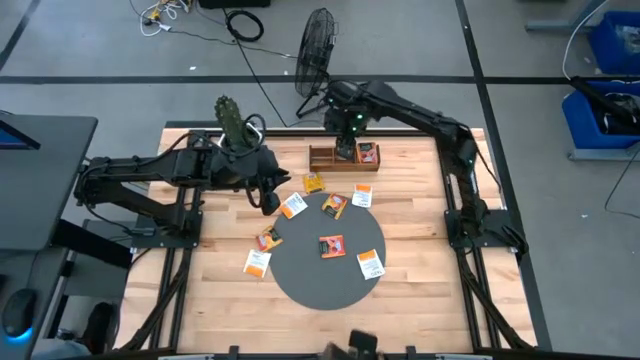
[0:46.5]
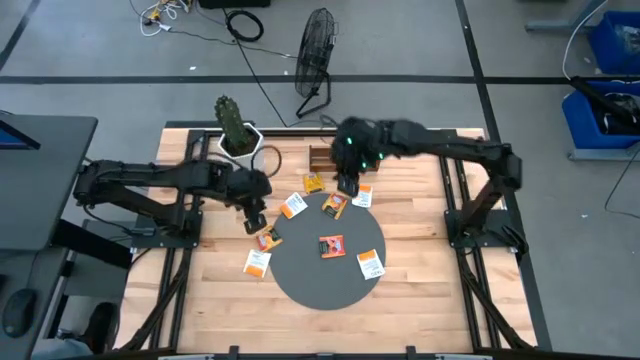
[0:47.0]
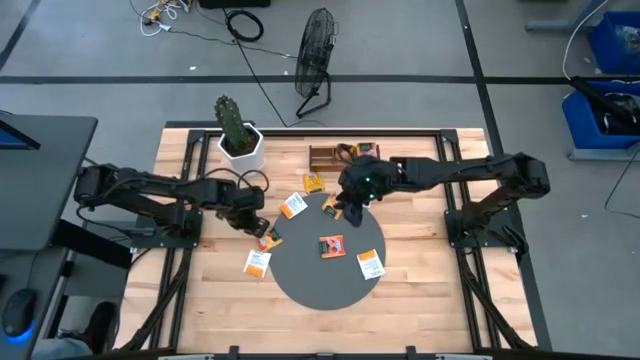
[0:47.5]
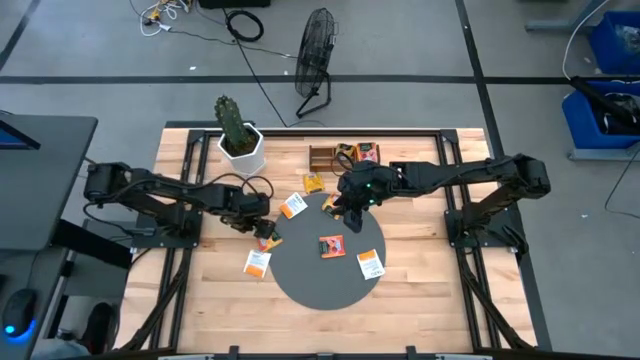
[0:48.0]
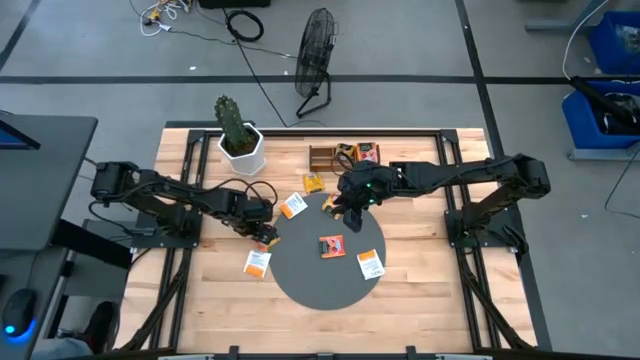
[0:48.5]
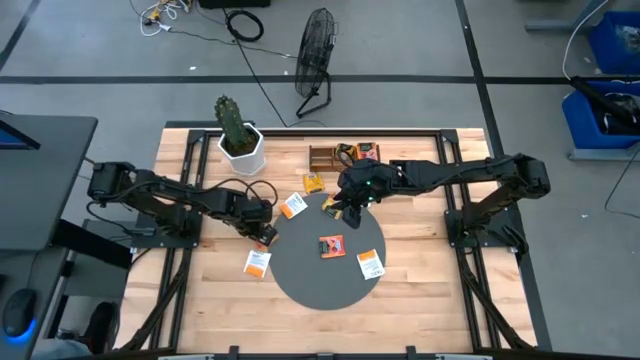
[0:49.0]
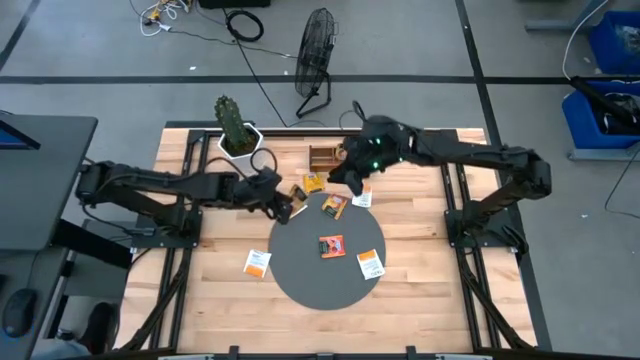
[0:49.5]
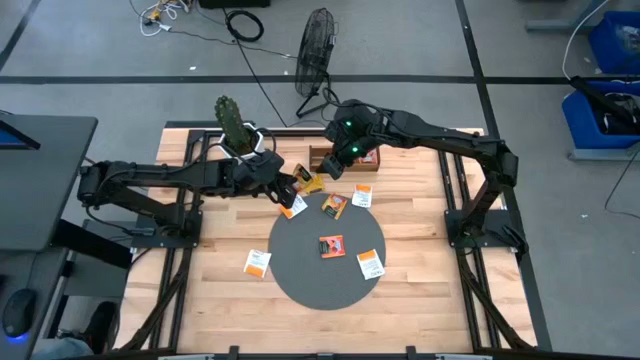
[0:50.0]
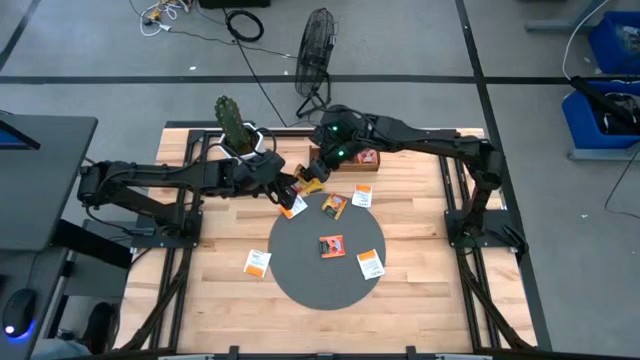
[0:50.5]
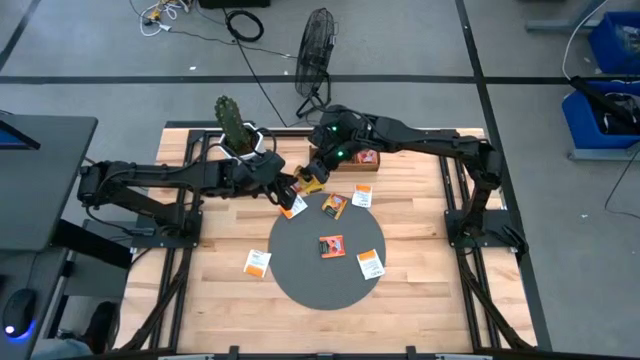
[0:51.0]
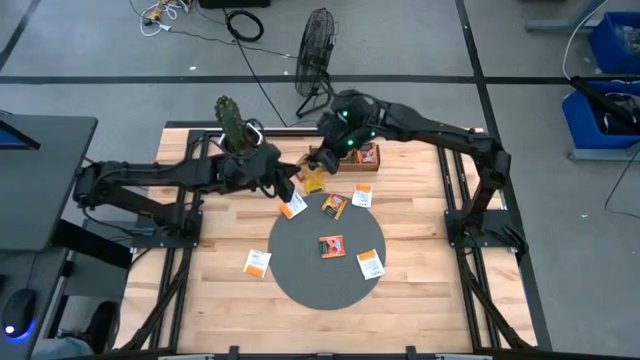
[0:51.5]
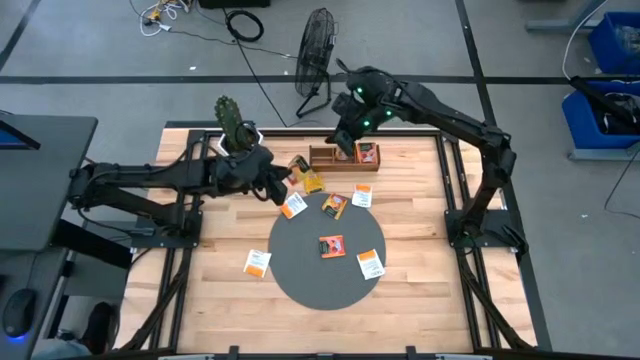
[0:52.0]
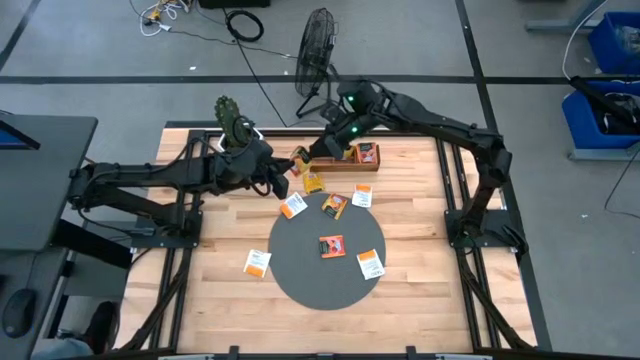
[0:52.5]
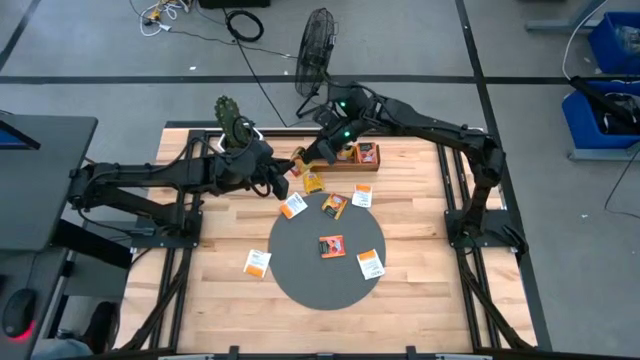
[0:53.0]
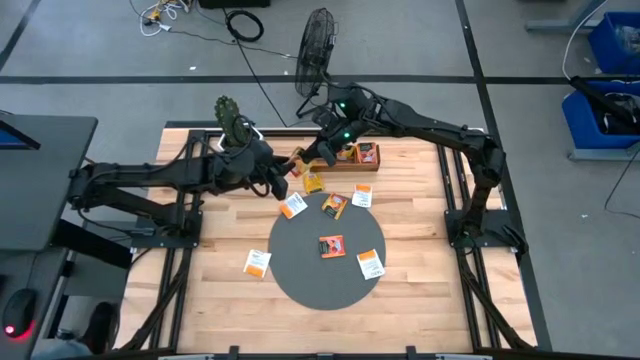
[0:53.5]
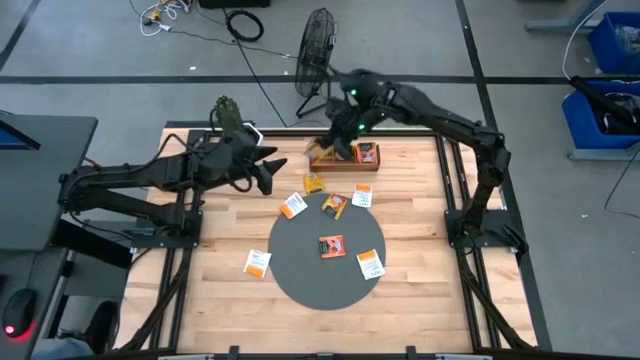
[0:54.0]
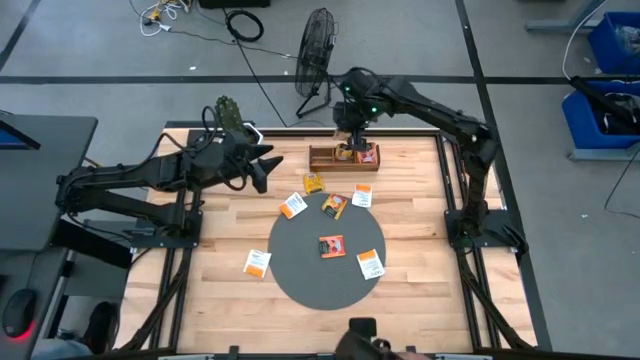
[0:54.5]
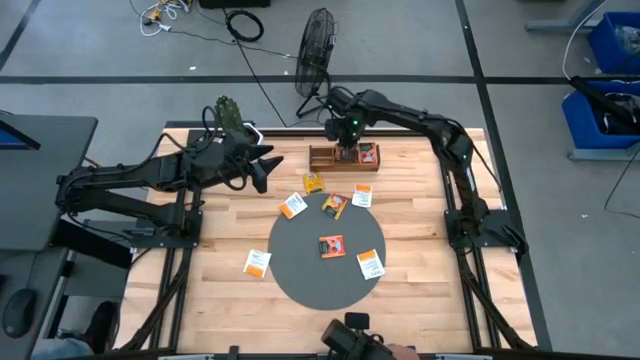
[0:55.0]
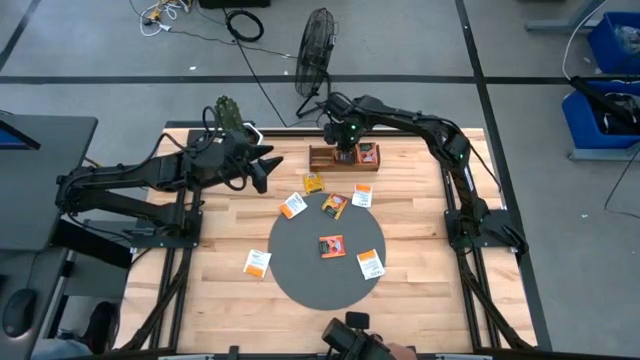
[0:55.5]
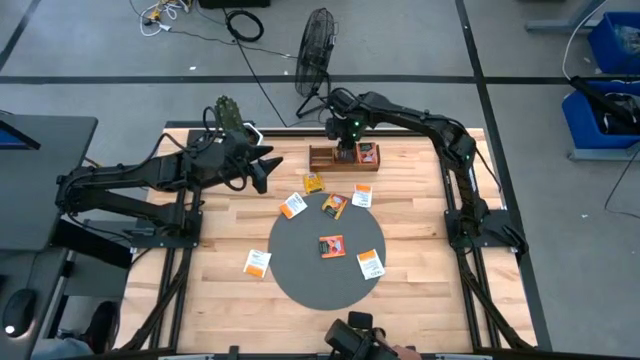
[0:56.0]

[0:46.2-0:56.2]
Task: Pick & Place Tea
Put the orange tea bag into the middle section of the wooden organizer

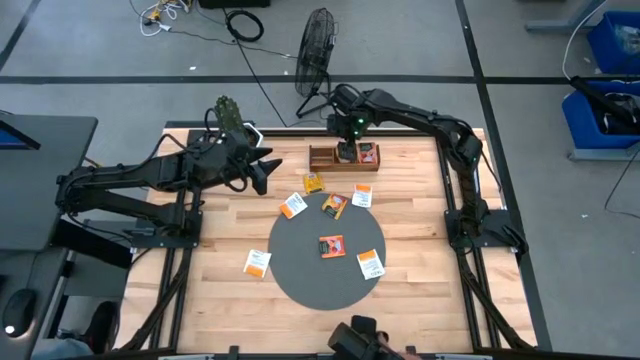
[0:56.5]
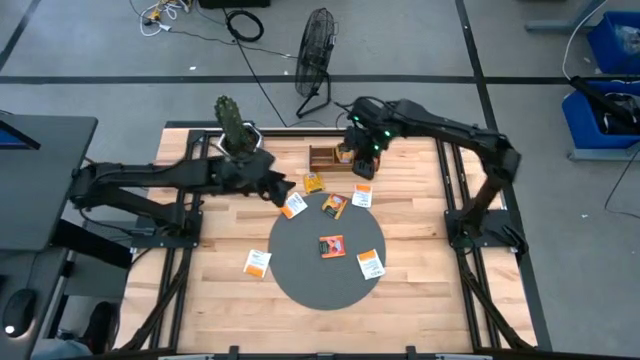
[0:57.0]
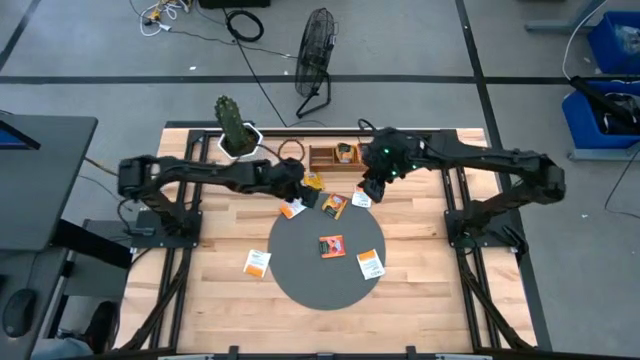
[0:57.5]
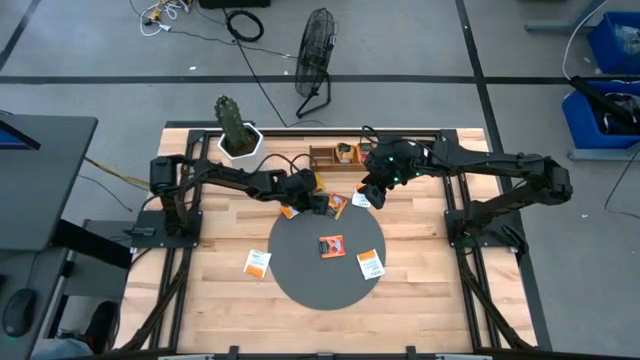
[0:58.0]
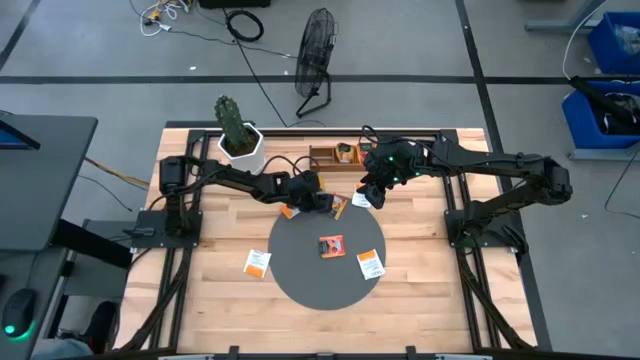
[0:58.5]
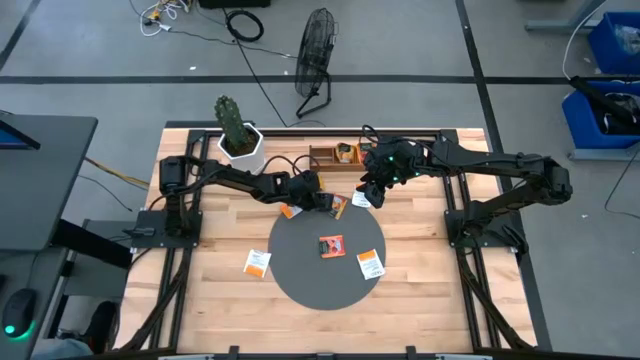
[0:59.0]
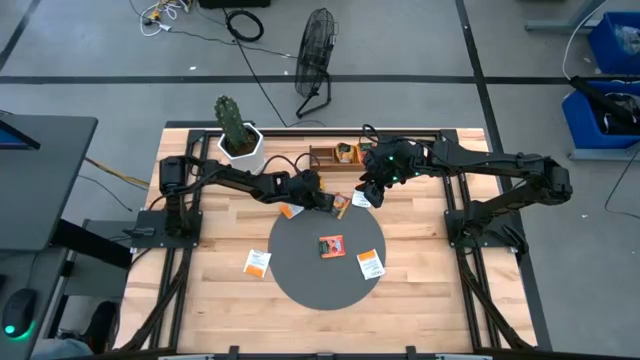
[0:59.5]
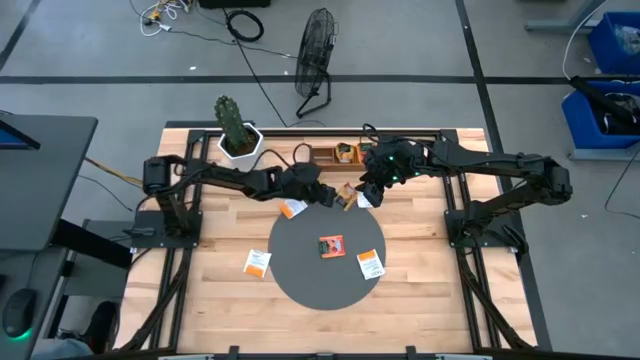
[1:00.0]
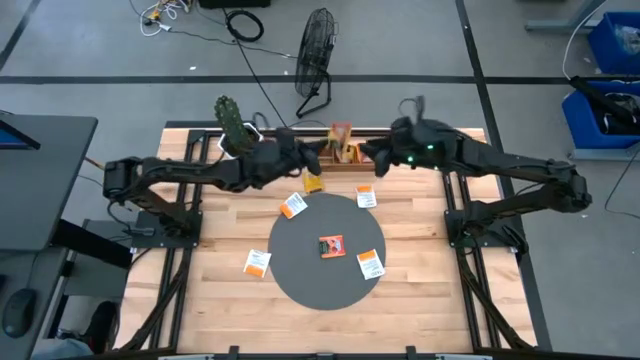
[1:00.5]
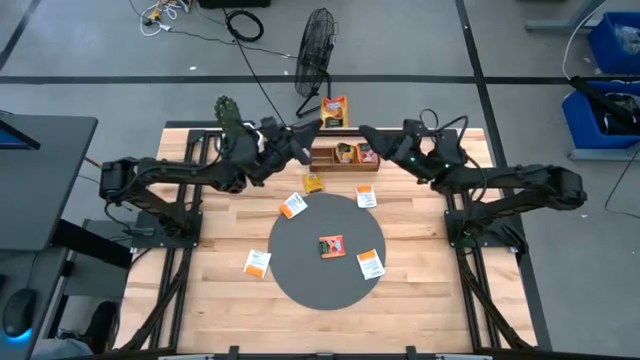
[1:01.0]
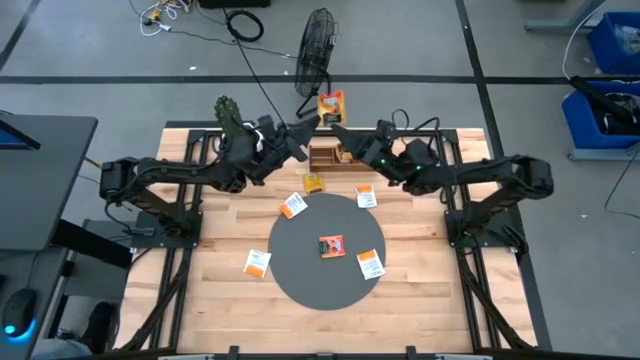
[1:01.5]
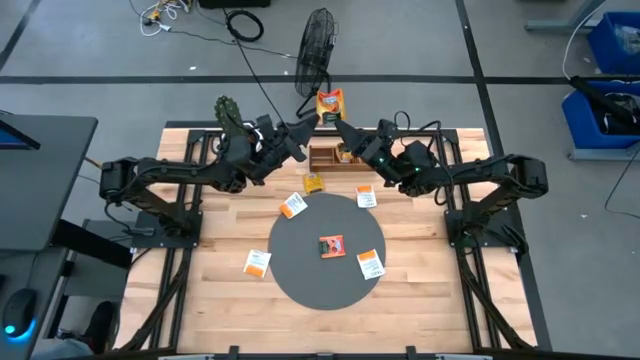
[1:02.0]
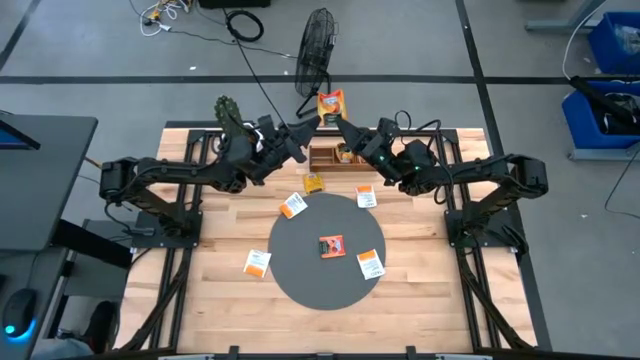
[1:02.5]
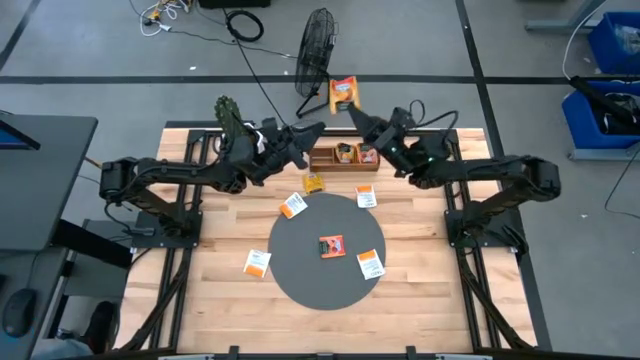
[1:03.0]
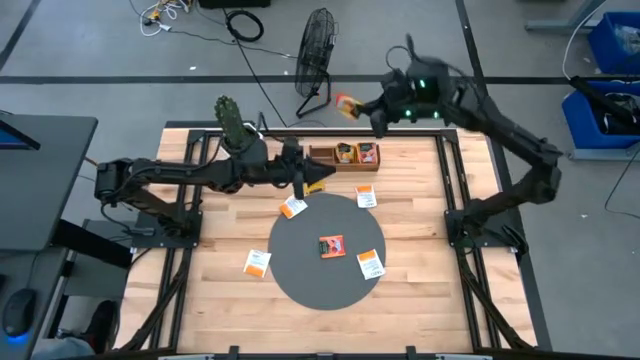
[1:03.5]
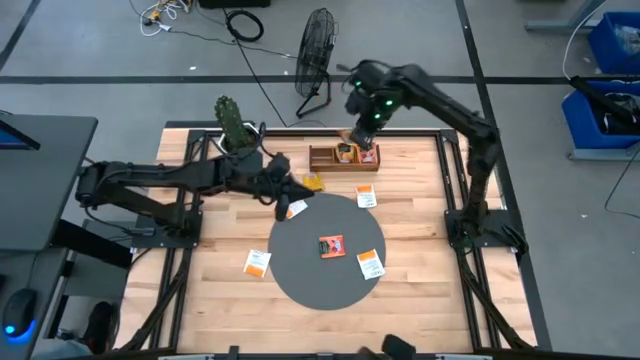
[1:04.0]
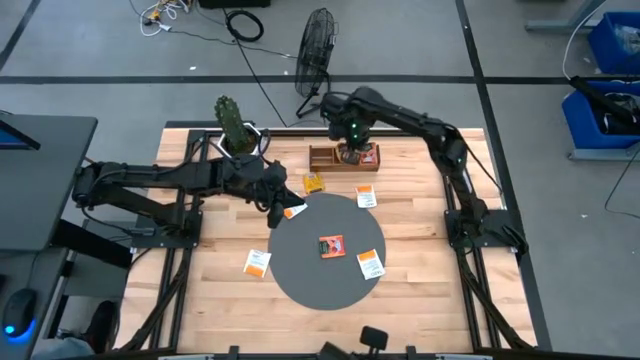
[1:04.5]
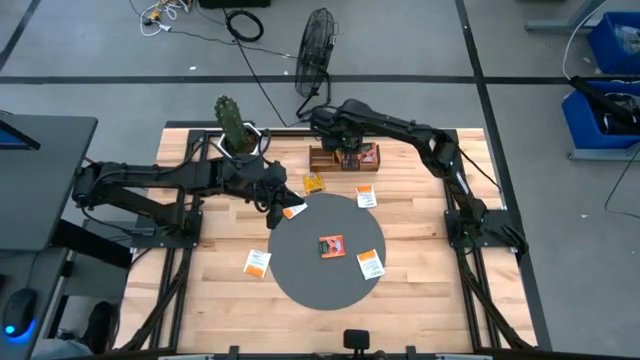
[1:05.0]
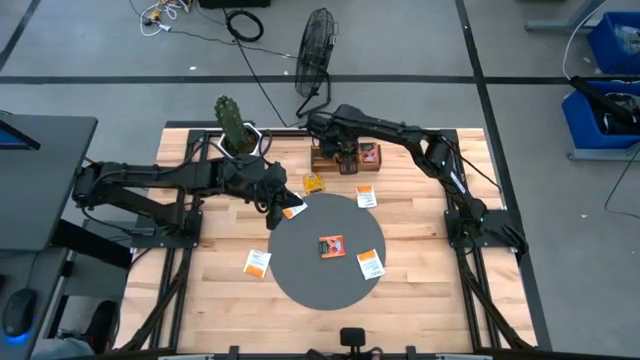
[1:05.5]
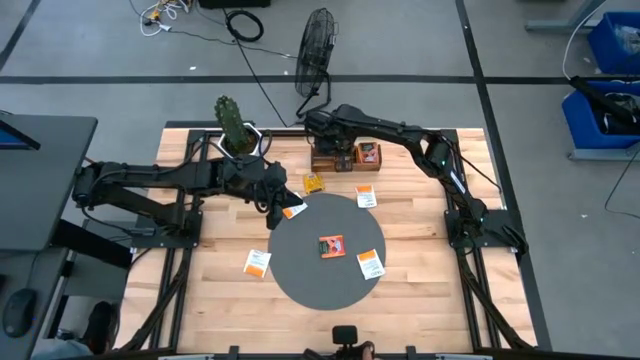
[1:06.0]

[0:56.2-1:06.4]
Put the orange tea bag into the middle section of the wooden organizer

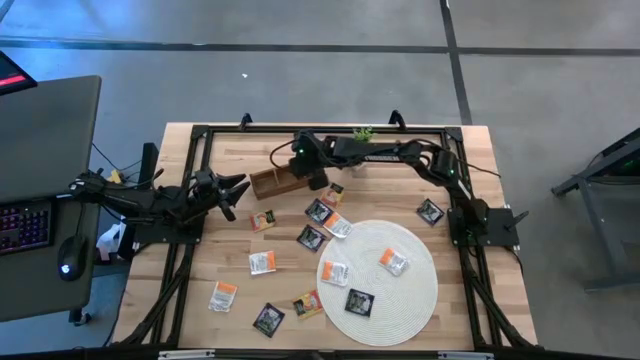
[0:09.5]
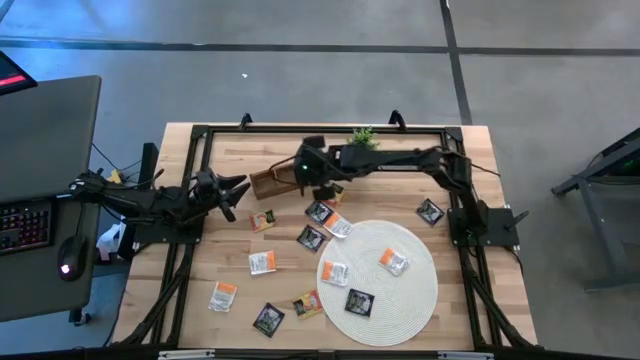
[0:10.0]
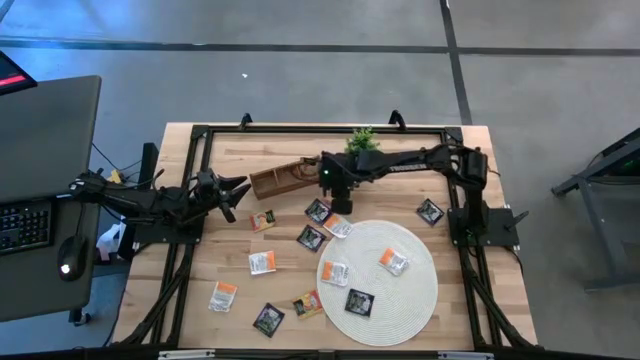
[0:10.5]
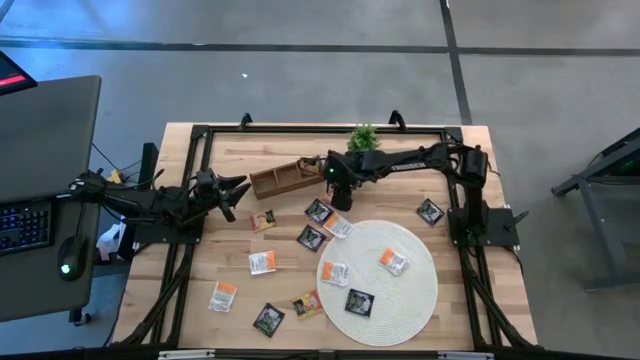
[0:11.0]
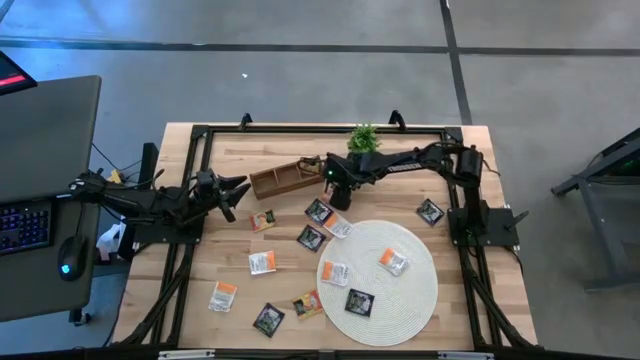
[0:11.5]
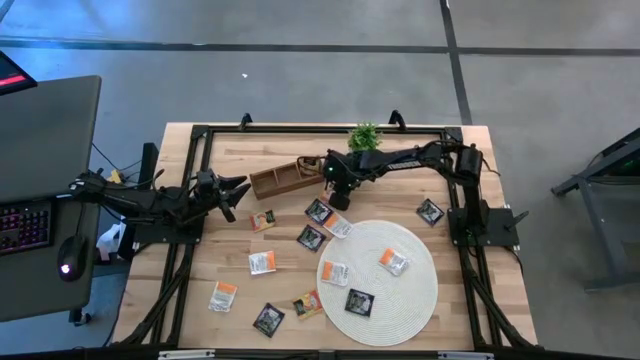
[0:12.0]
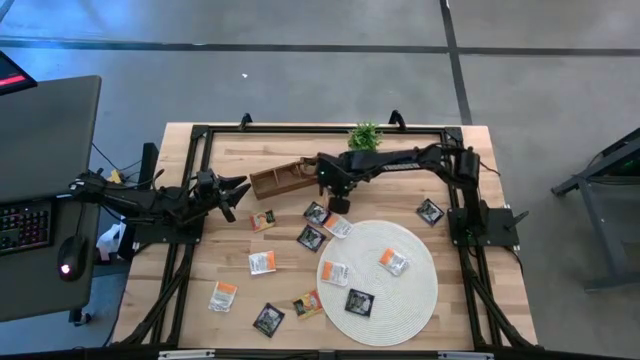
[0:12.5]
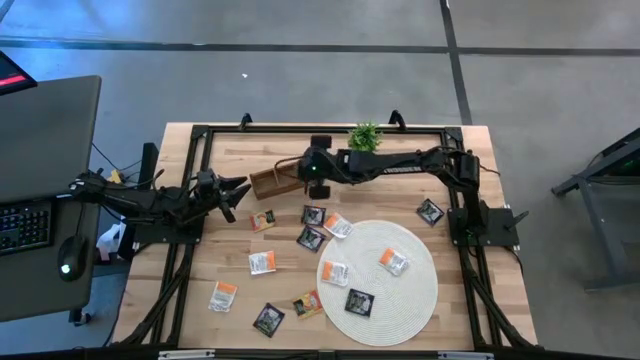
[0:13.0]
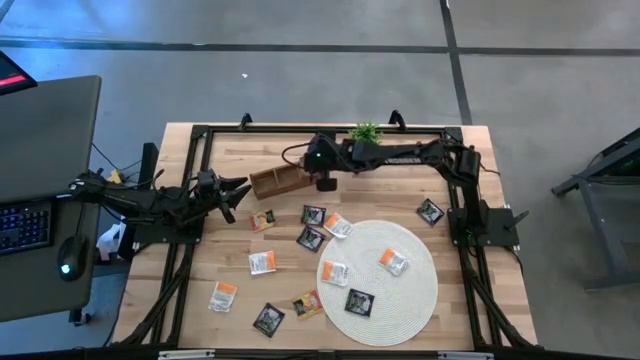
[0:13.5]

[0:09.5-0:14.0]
Task: Pick & Place Tea
Put the orange tea bag into the right section of the wooden organizer
